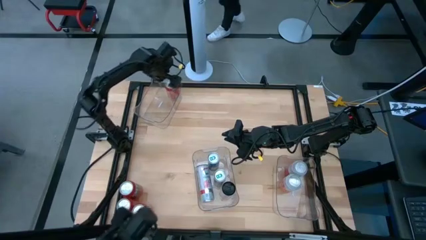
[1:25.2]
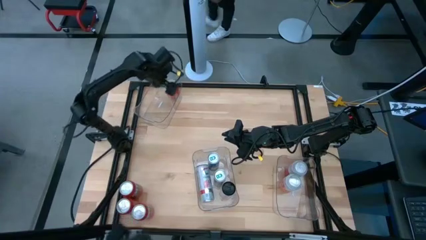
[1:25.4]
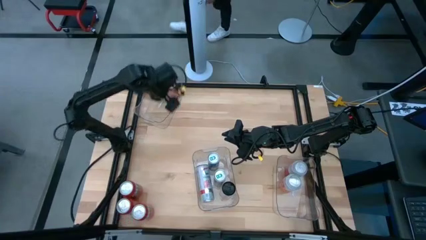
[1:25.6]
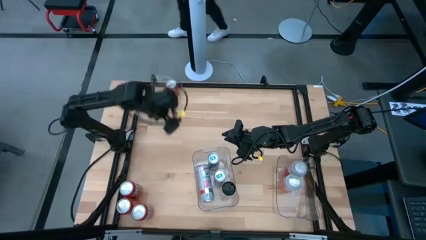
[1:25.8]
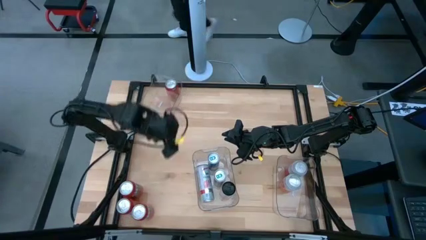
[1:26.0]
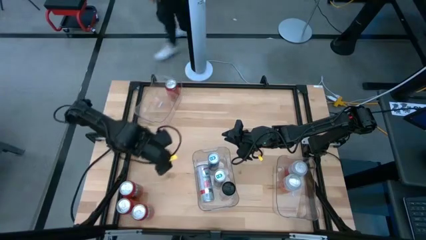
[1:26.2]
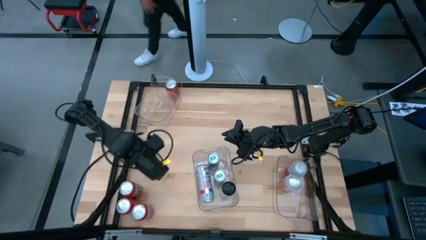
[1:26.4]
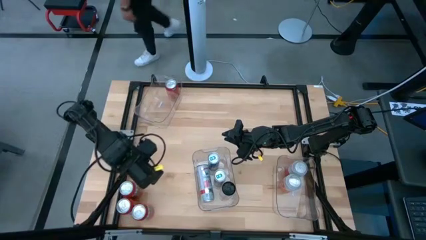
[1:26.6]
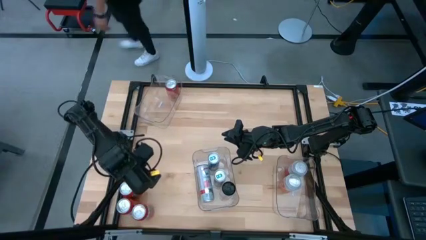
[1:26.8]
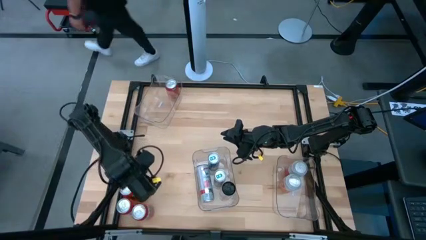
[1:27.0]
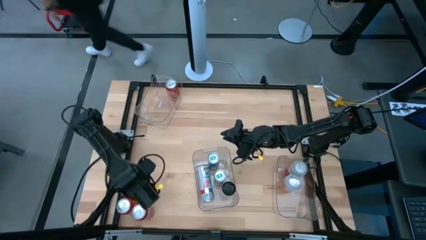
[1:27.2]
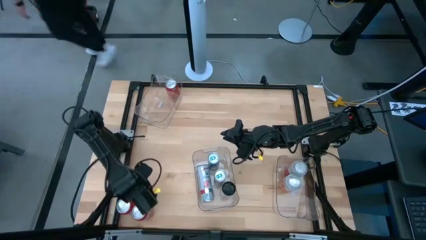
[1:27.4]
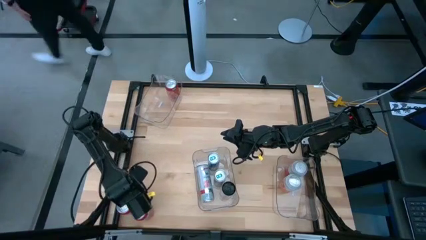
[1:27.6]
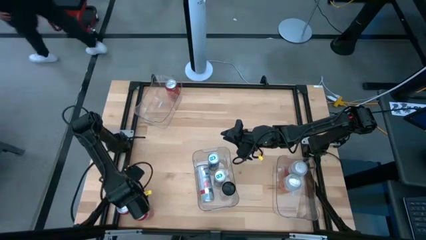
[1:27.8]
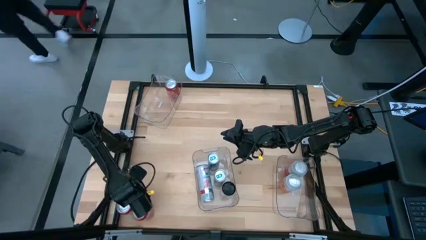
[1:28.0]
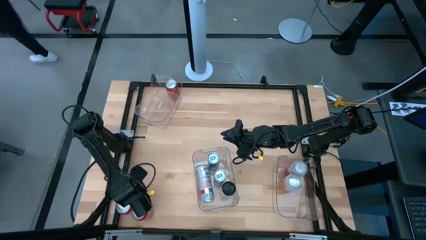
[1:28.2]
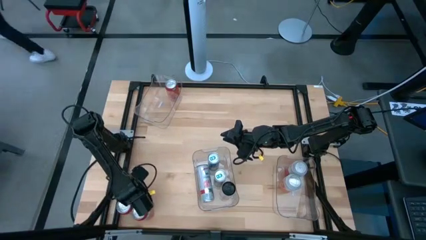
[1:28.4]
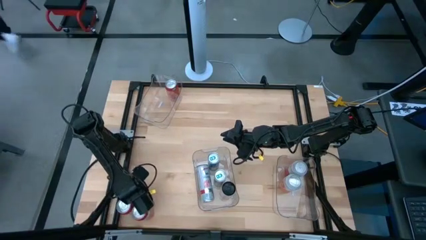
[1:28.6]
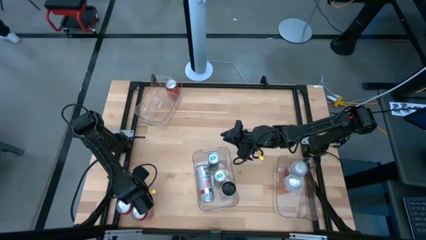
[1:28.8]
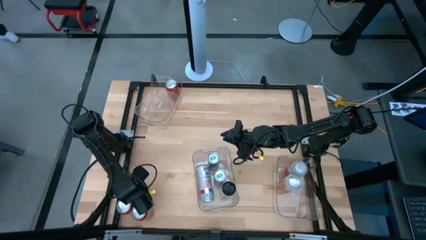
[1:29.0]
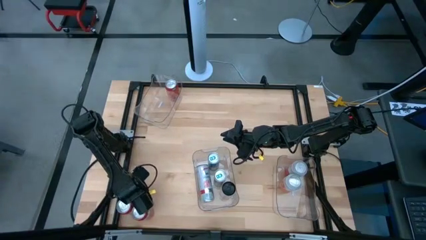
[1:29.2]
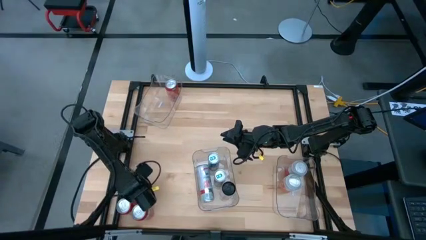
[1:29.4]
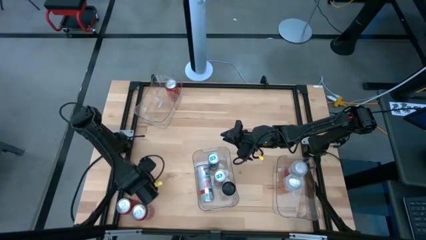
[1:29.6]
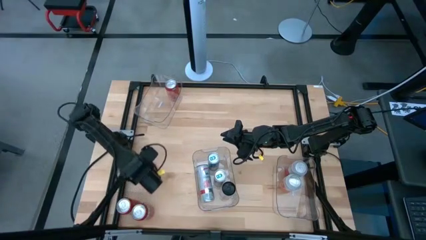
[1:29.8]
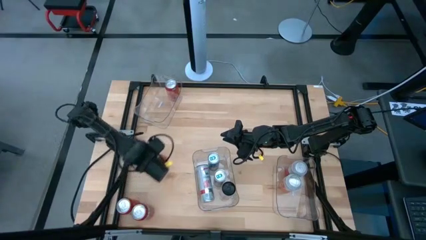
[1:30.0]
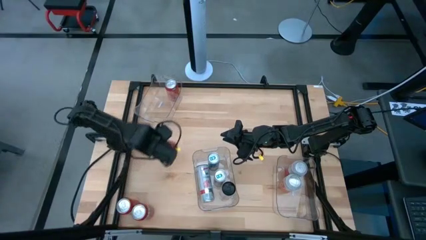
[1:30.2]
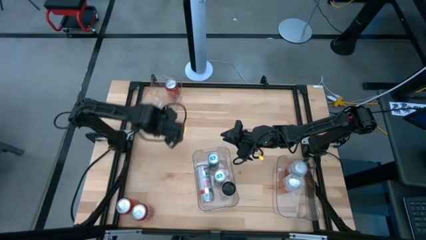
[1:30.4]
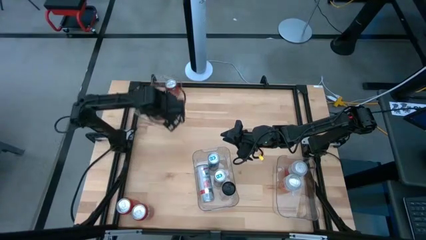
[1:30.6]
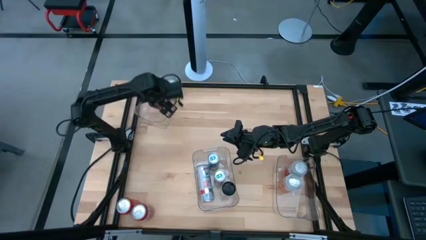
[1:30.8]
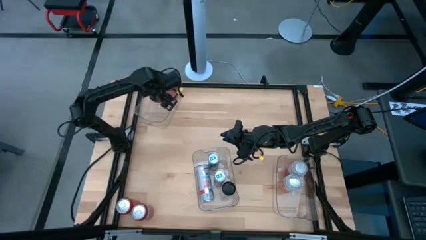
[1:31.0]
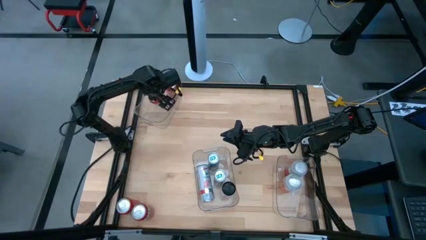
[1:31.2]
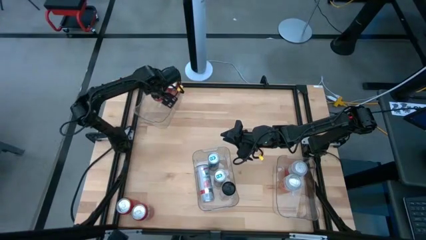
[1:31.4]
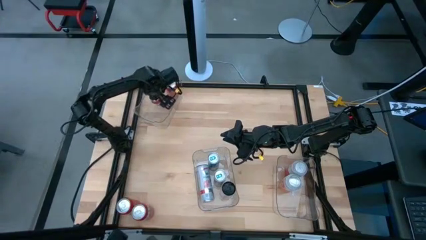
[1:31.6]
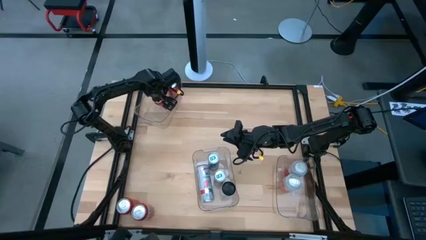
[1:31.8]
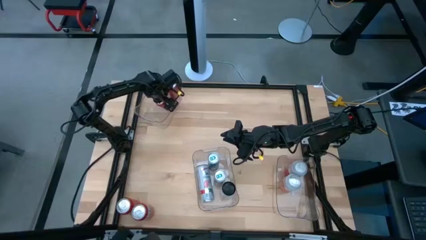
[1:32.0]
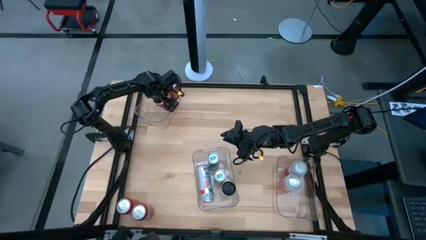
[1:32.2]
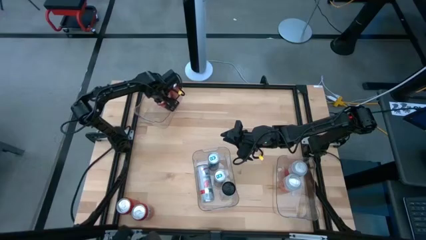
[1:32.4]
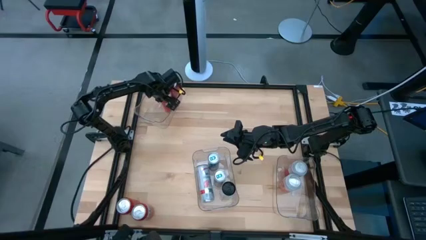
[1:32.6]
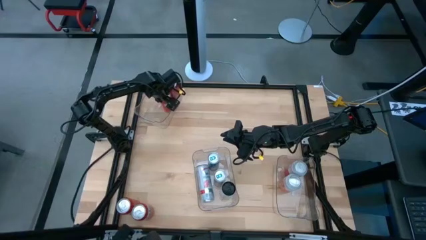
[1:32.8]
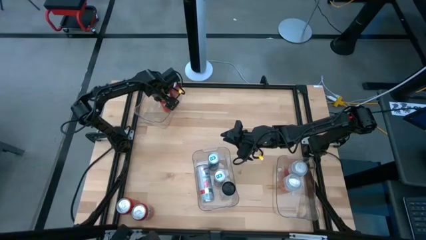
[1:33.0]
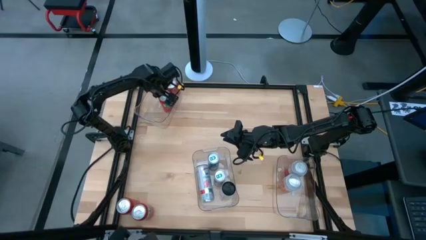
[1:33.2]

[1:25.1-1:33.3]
Task: Sort soda cans
Put the top orange soda can into the top transparent bin

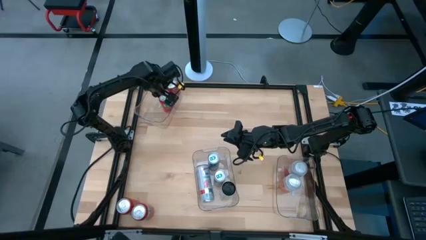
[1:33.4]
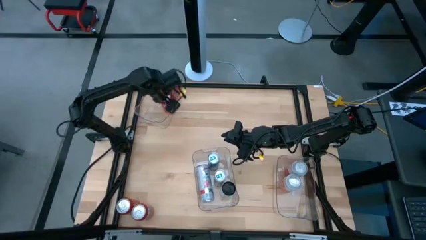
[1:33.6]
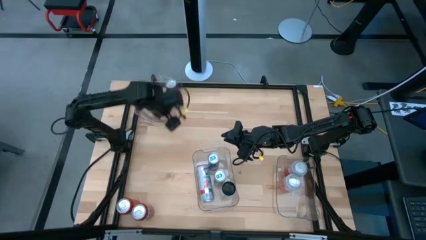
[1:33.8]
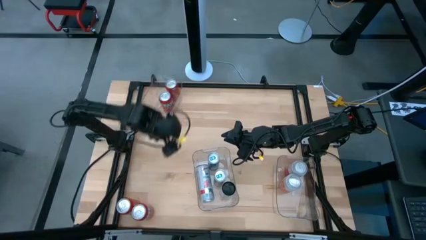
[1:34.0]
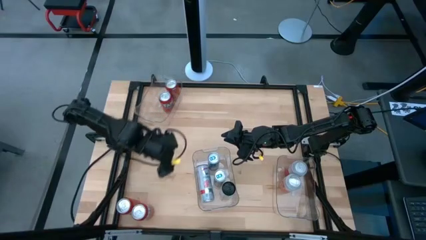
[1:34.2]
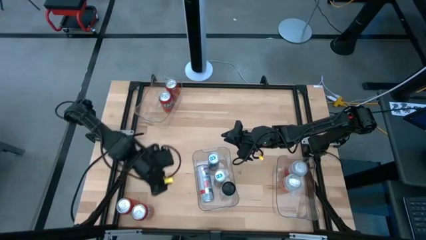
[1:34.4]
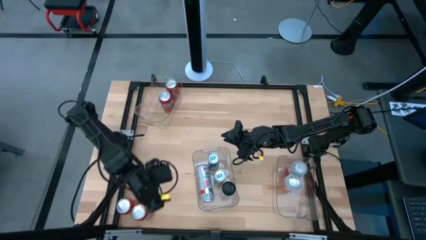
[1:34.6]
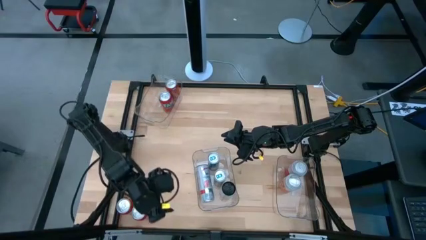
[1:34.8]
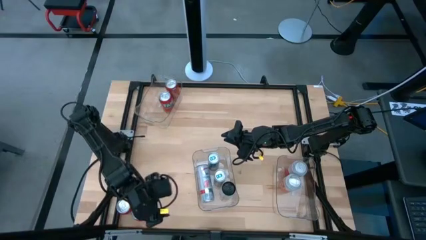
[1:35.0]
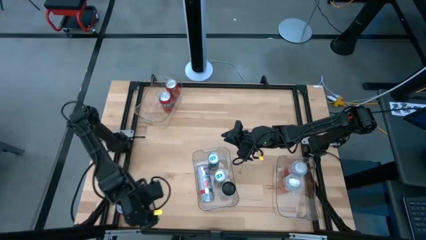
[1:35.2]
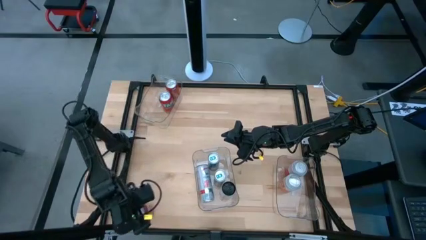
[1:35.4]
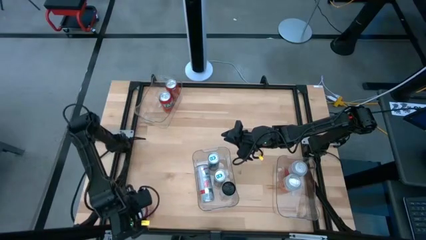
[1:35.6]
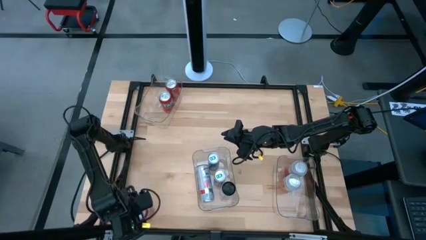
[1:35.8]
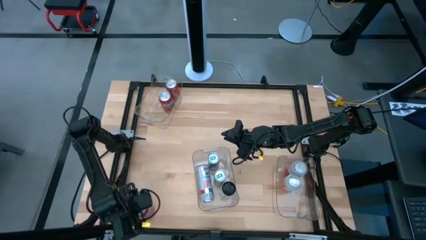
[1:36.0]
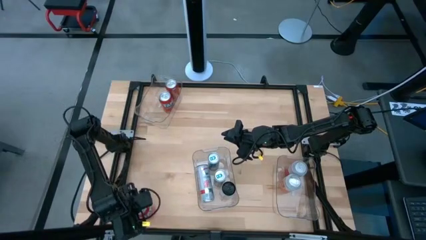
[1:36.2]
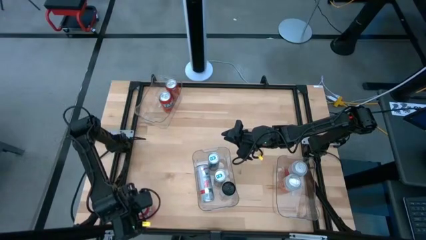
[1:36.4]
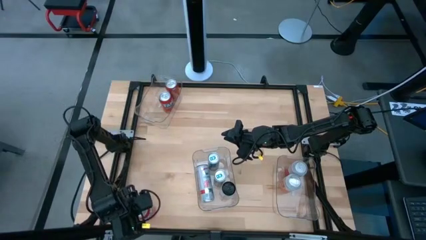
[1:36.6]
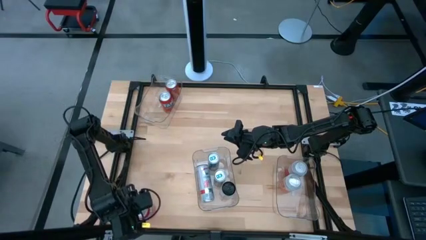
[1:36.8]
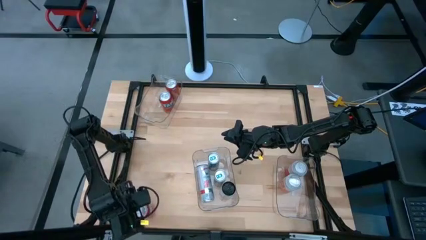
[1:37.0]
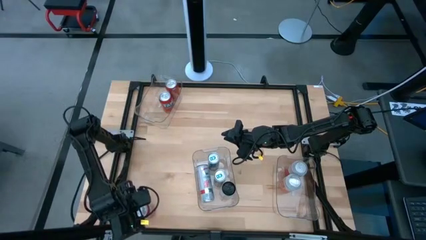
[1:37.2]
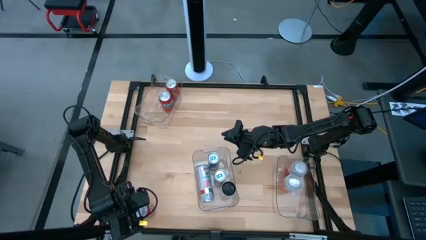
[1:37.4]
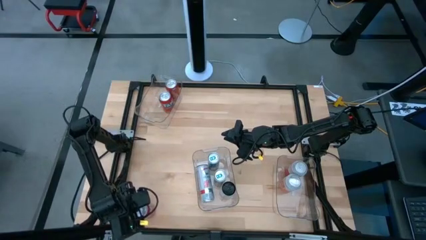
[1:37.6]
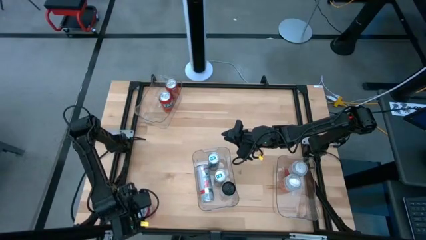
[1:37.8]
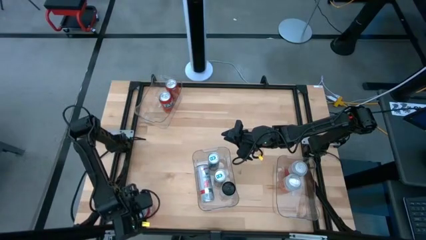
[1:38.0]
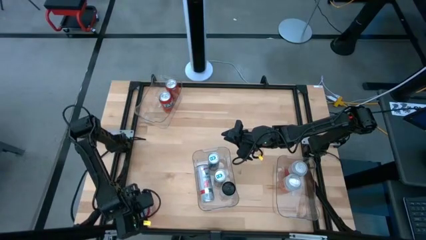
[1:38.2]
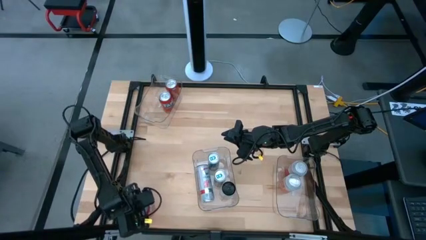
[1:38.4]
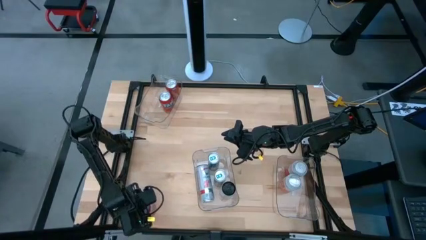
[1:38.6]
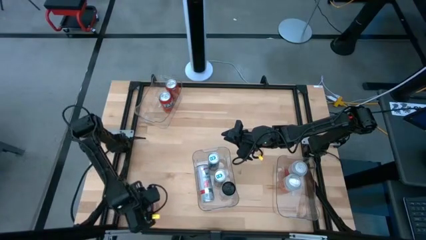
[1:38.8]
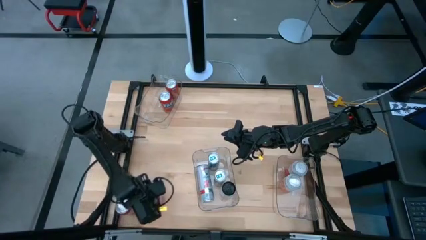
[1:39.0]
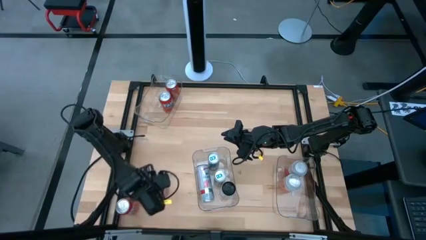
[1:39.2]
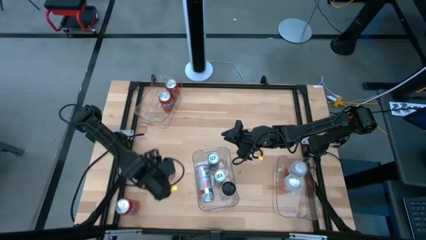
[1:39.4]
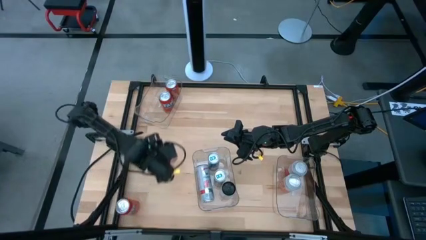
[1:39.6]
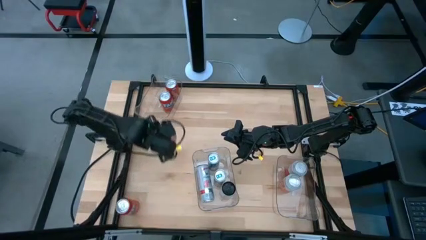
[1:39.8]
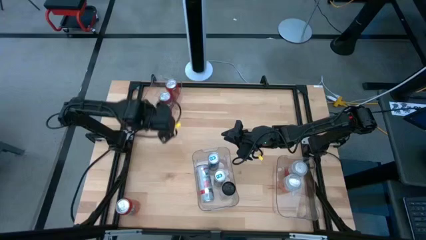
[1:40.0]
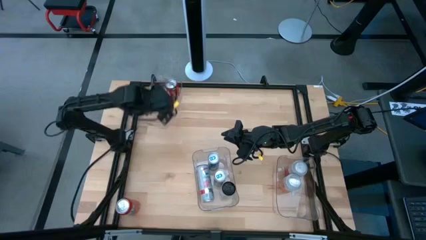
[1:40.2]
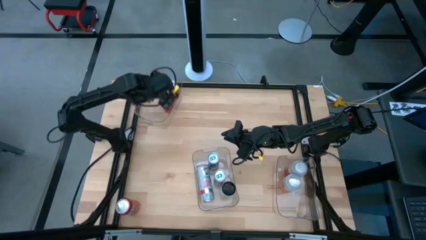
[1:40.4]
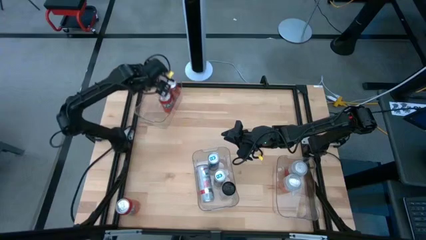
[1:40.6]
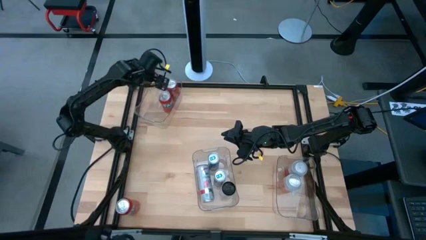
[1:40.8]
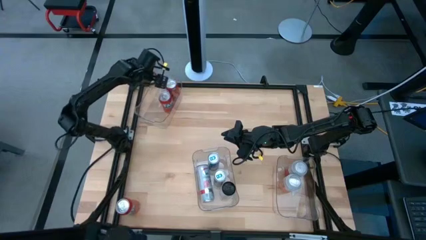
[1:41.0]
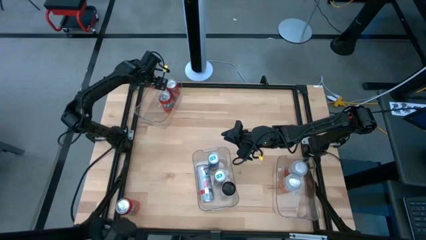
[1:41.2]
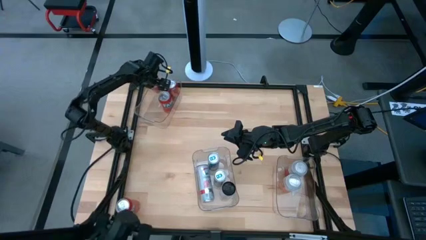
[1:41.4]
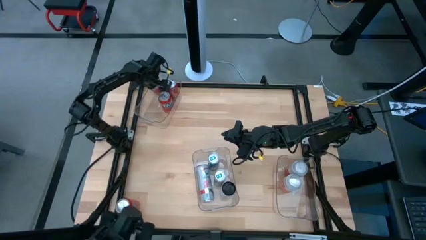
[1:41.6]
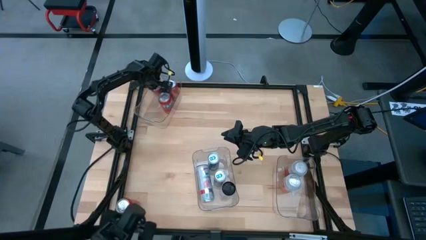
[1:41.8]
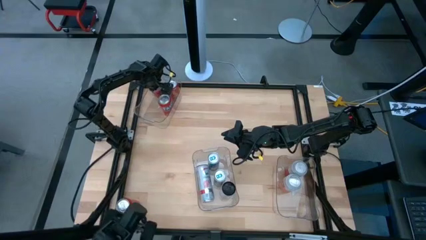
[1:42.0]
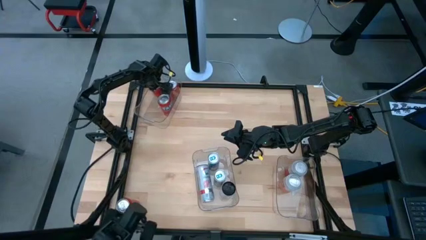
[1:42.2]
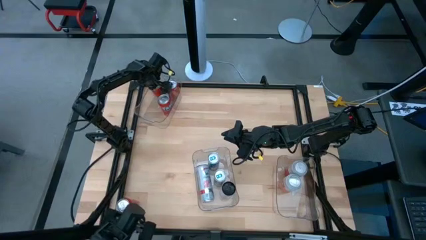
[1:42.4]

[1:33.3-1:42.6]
Put the right orange soda can into the top transparent bin
